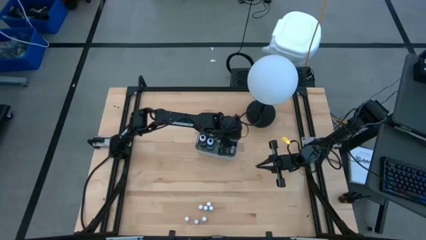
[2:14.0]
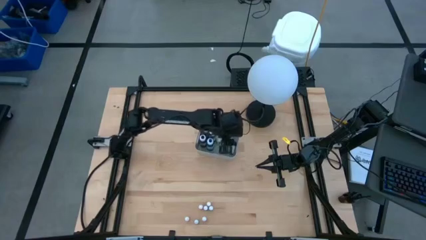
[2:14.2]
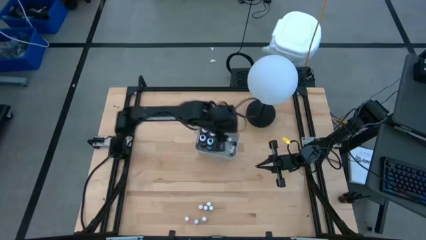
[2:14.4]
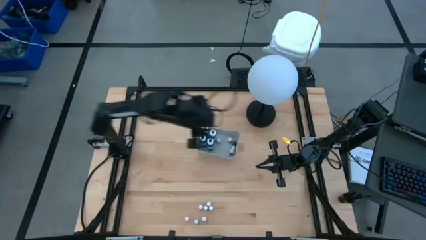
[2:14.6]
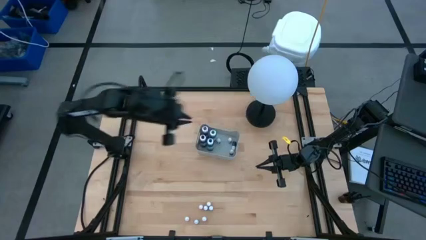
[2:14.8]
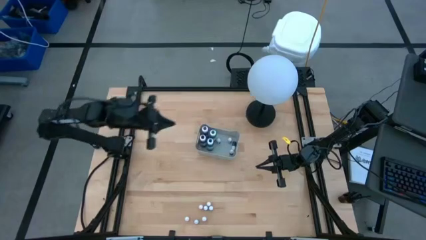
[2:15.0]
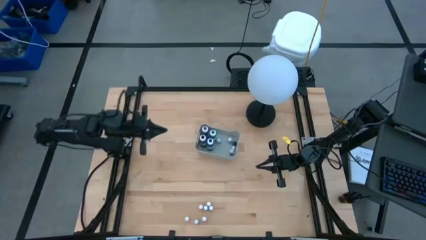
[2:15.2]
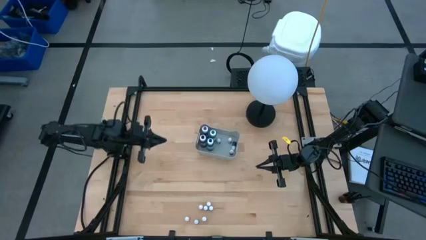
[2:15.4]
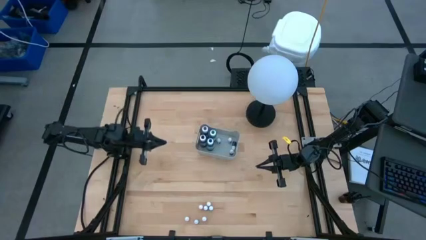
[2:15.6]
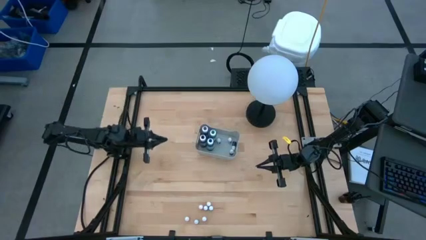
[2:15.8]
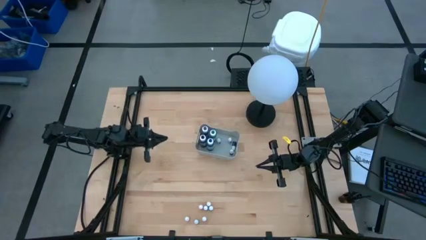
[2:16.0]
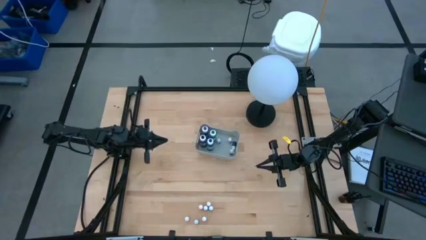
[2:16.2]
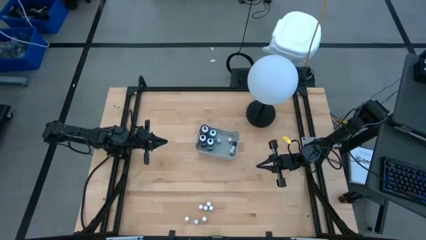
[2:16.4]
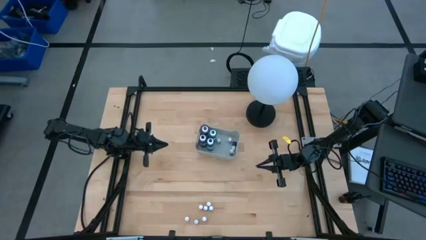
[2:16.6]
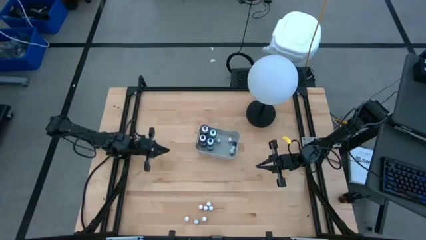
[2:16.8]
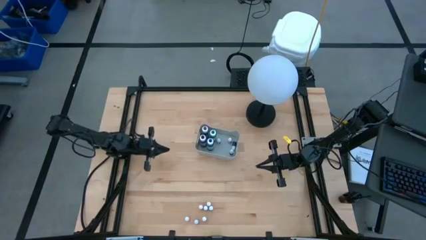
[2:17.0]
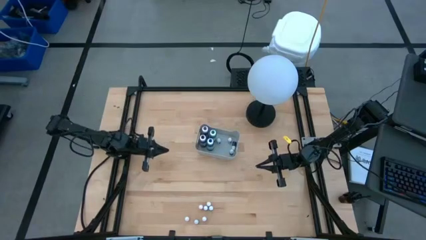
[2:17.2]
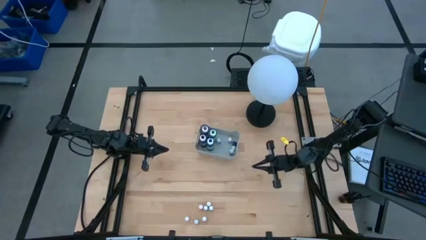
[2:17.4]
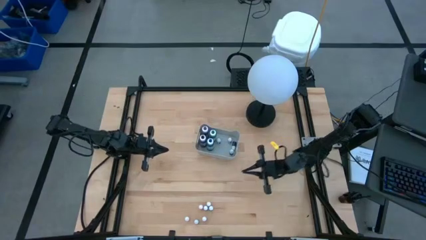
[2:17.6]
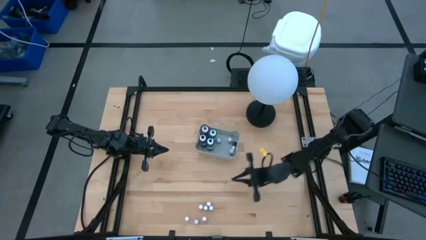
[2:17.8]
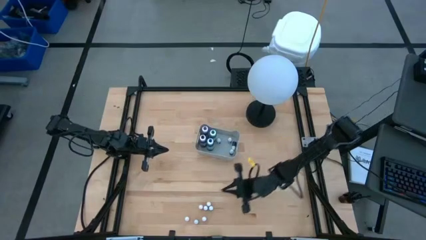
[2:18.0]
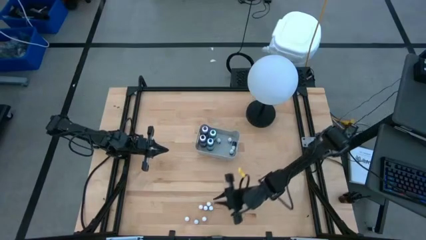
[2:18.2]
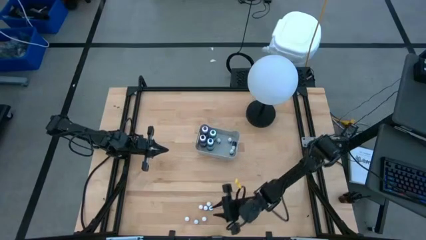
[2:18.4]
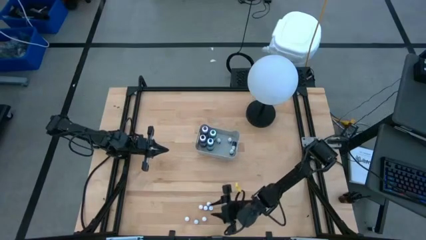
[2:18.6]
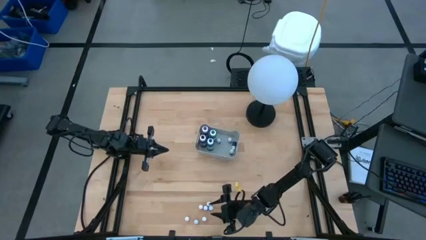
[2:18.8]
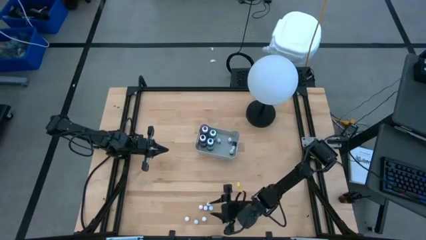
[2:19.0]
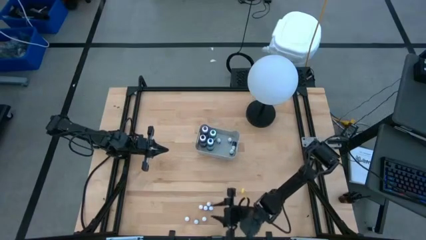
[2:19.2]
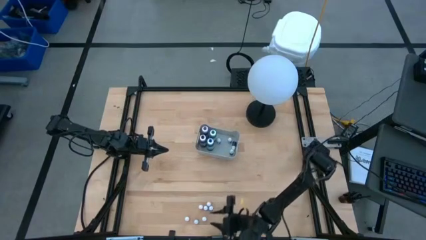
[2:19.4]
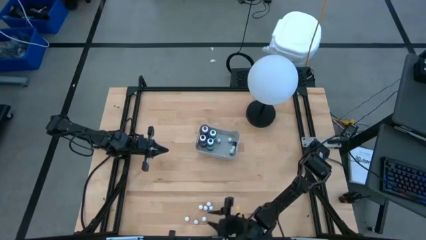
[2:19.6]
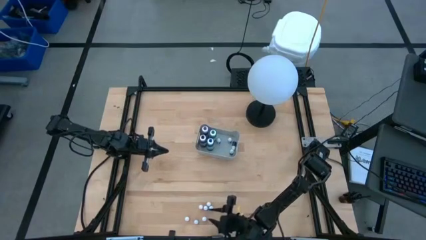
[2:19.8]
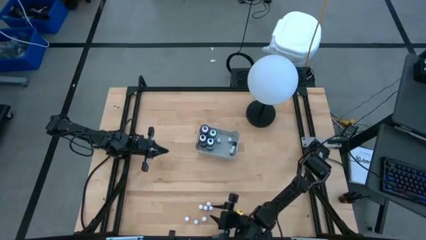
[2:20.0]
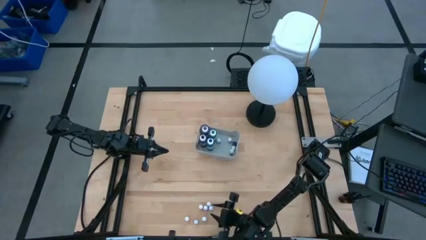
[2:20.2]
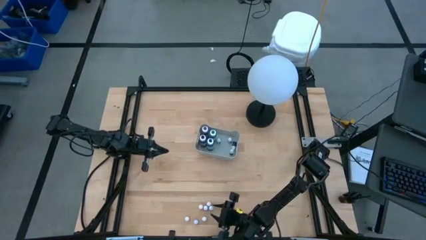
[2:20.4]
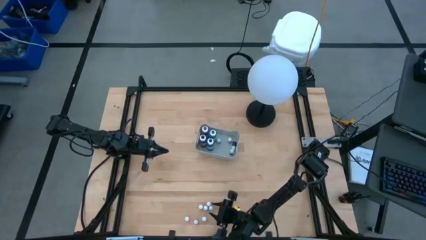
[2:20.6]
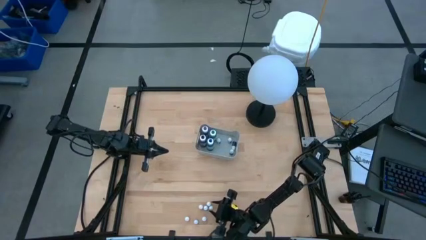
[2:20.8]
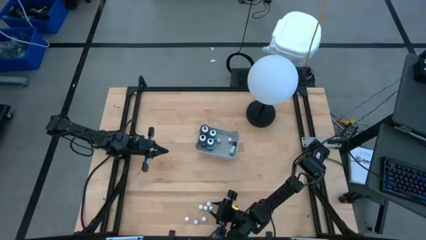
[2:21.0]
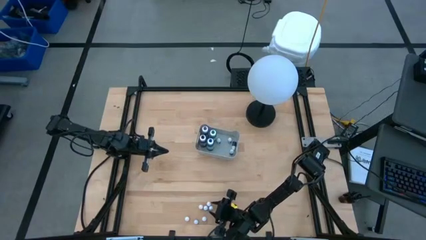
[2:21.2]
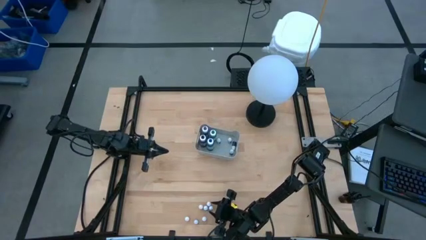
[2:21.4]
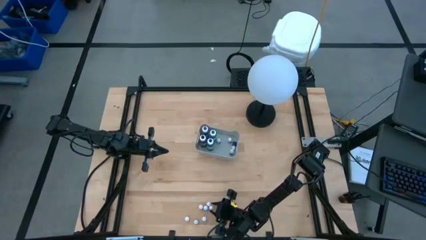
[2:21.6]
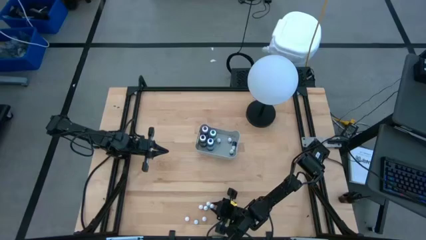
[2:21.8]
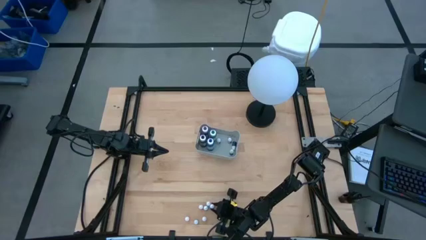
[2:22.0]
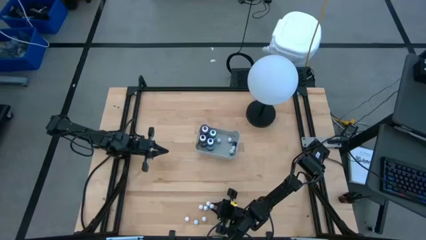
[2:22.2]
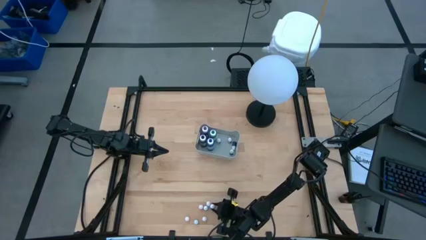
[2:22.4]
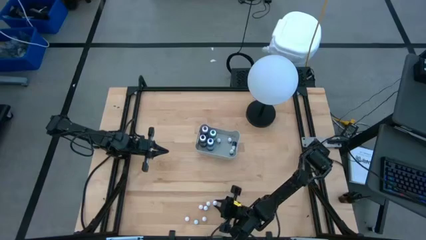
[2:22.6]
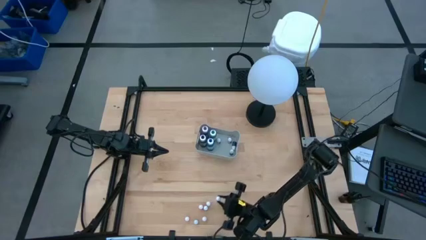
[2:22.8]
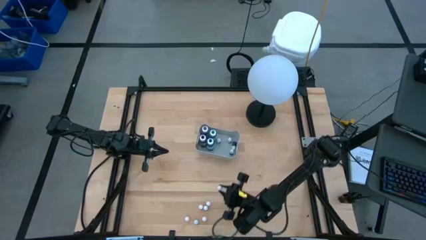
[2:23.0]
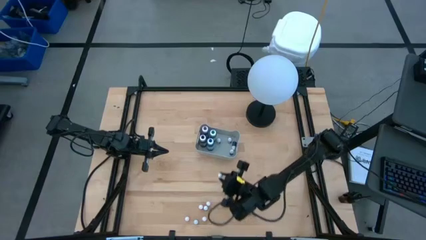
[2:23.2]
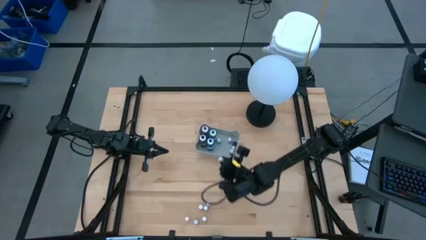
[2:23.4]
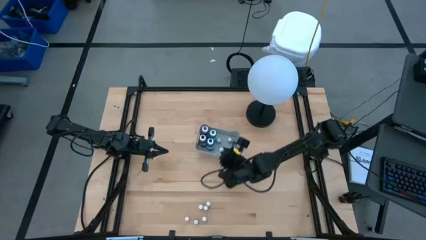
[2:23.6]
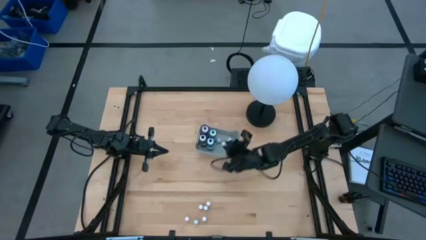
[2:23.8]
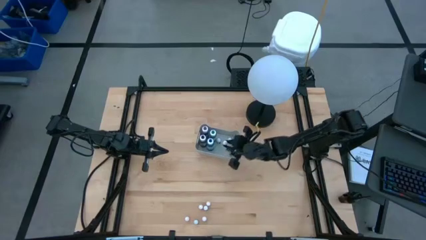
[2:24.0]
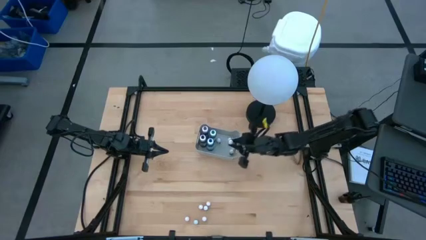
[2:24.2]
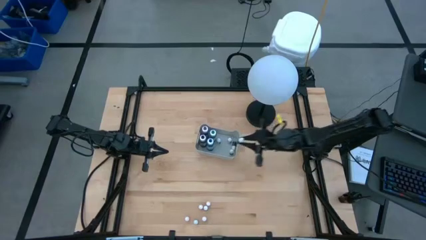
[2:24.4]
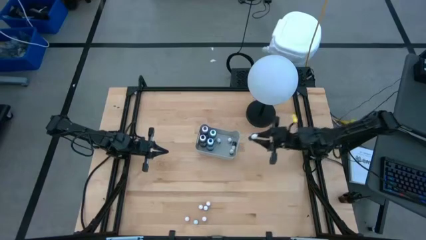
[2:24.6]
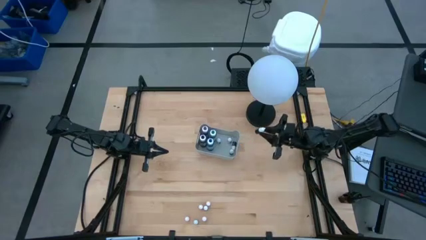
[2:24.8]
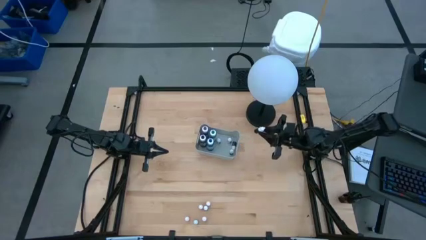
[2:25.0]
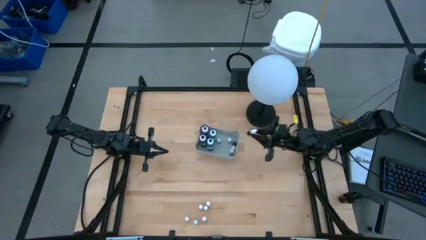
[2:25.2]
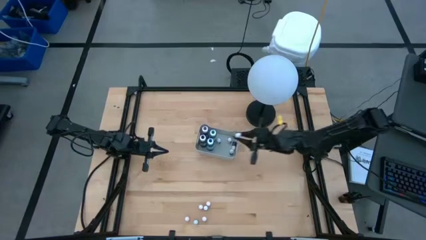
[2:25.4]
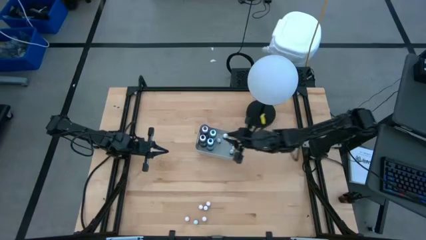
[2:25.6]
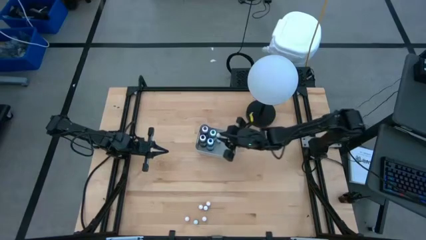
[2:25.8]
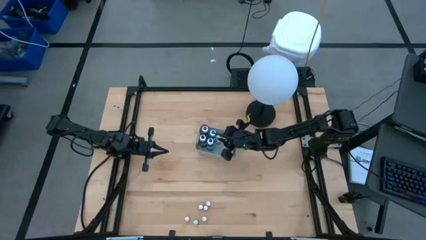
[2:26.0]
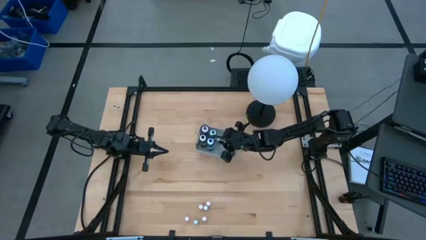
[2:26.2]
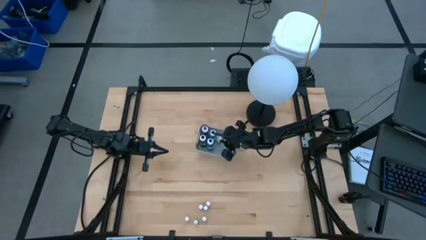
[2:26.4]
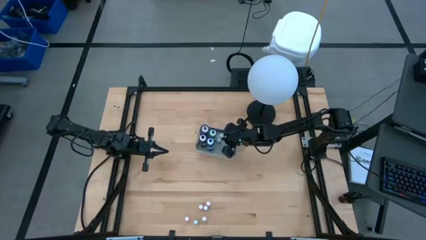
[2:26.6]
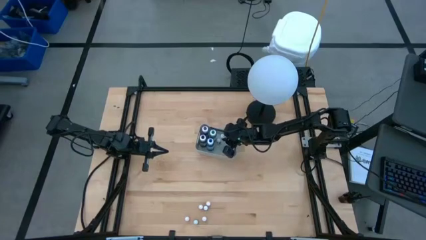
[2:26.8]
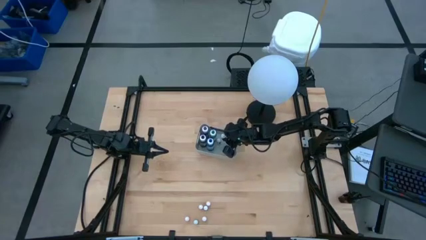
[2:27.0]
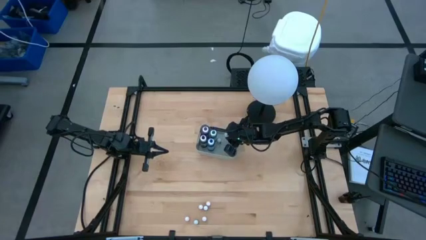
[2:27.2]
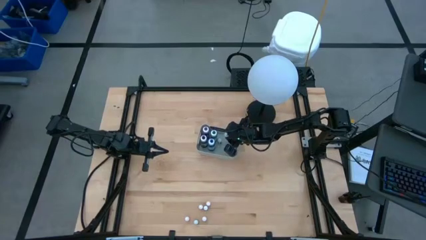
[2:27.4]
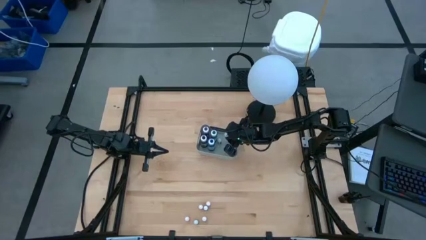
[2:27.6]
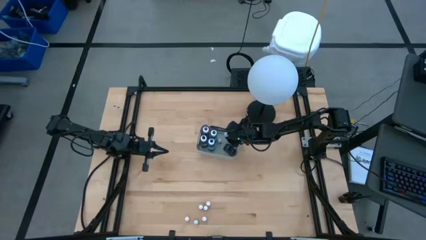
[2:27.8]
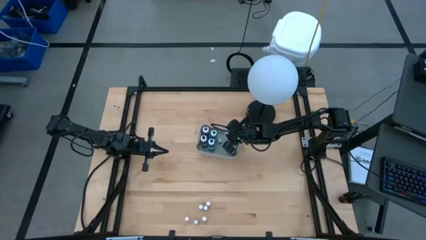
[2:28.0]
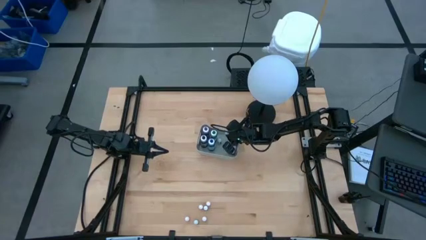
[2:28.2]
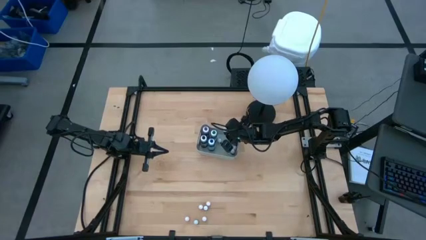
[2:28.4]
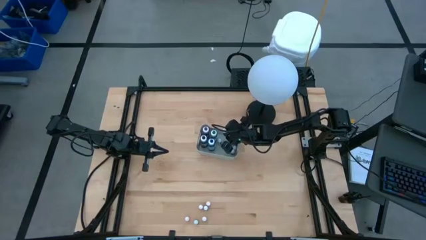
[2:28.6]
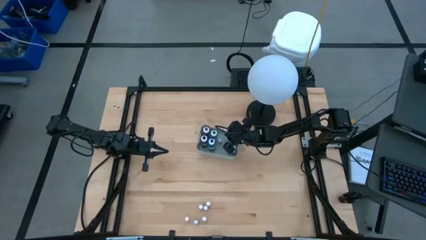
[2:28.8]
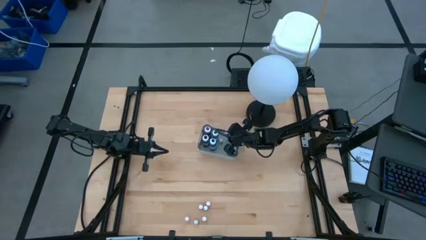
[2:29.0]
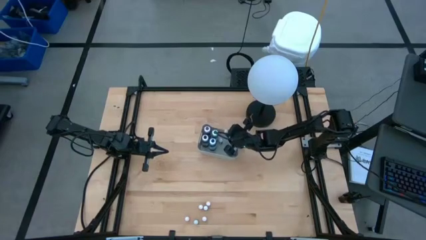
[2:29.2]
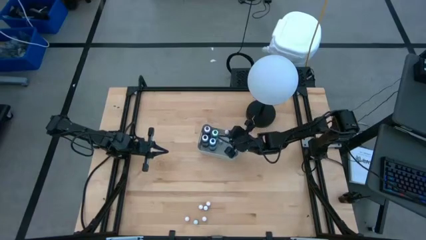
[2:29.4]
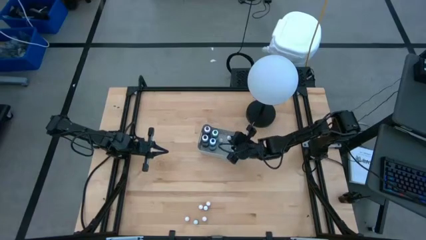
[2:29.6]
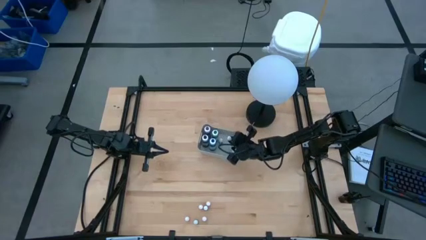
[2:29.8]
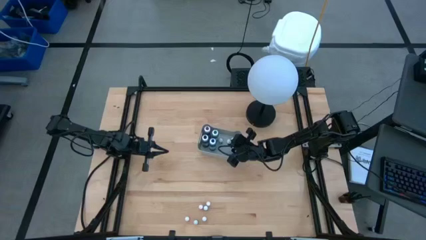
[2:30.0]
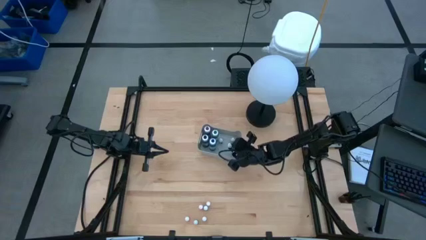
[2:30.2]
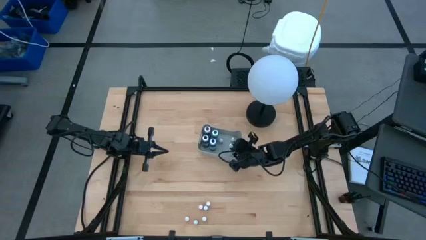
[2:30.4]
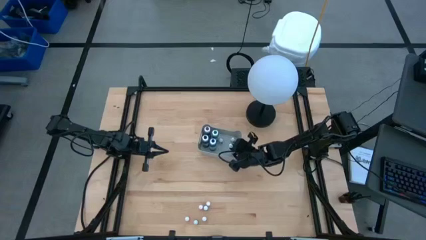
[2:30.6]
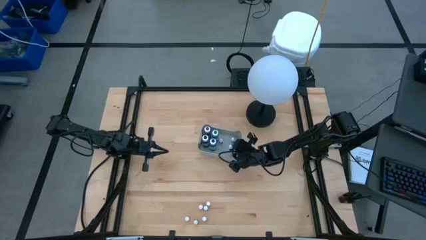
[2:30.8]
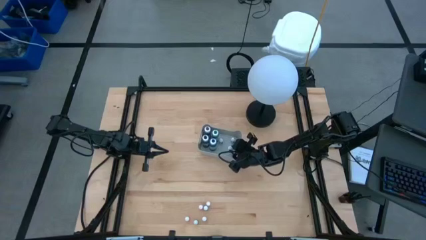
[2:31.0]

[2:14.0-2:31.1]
Task: Pick & Place food coloring
Put the small red food coloring bottle into the gray bin
